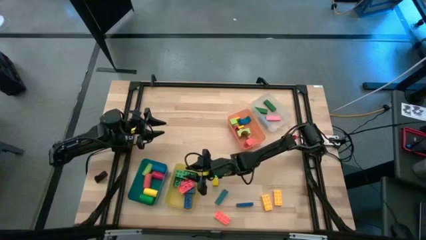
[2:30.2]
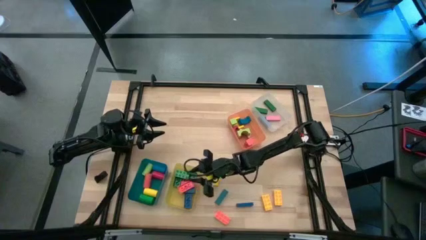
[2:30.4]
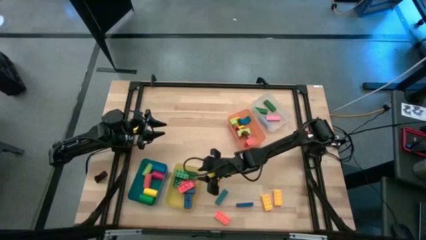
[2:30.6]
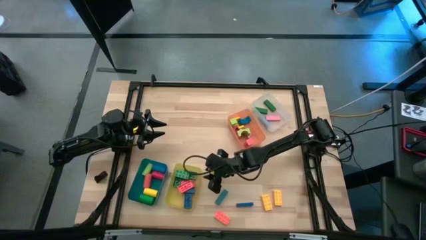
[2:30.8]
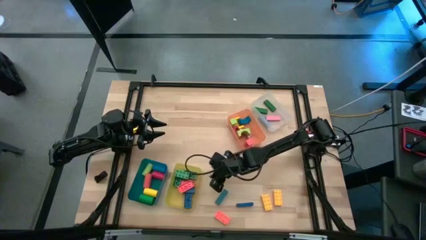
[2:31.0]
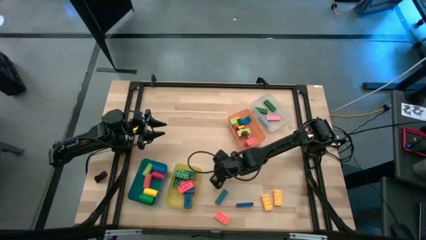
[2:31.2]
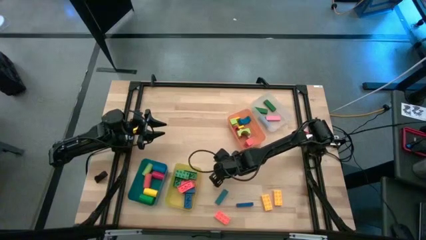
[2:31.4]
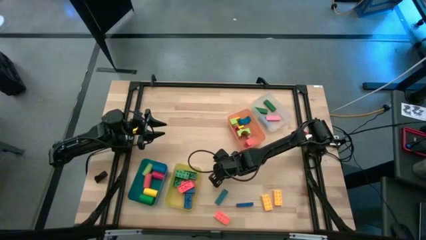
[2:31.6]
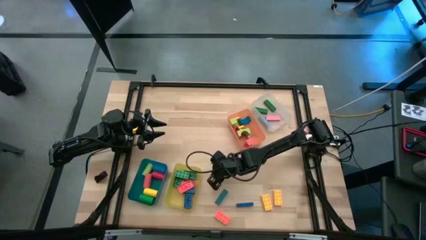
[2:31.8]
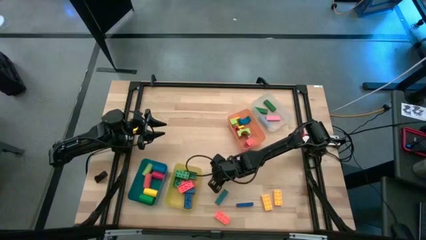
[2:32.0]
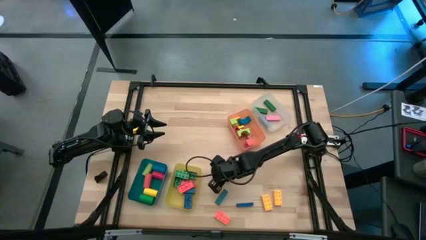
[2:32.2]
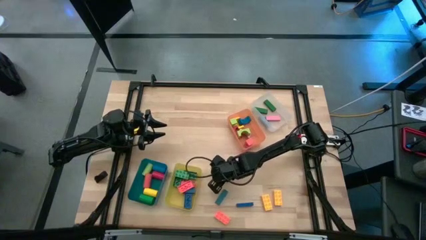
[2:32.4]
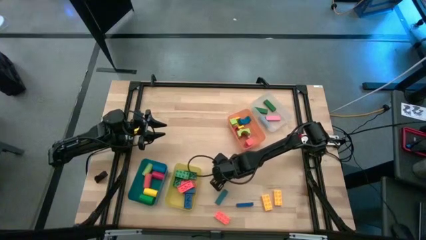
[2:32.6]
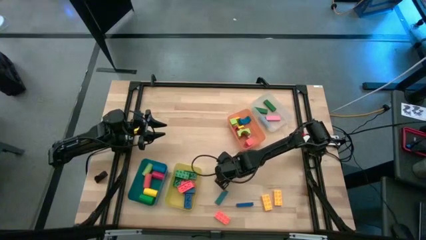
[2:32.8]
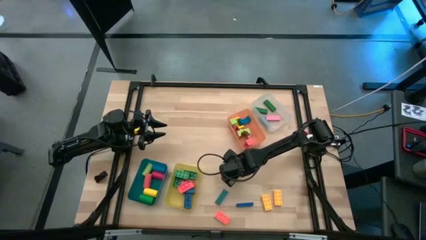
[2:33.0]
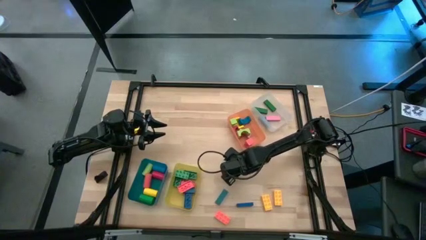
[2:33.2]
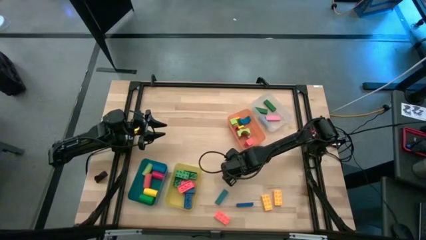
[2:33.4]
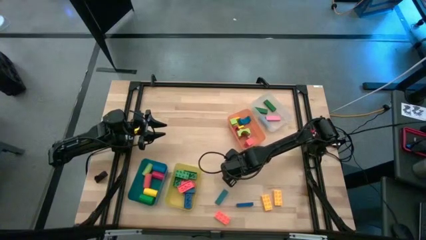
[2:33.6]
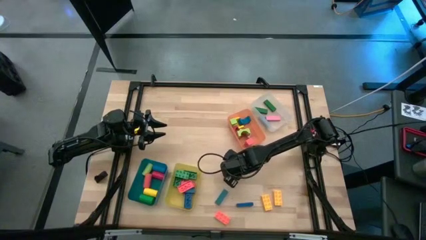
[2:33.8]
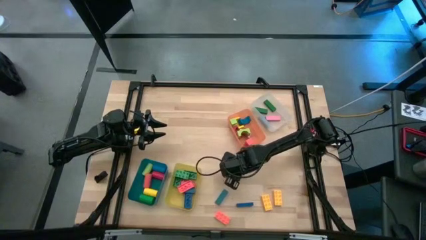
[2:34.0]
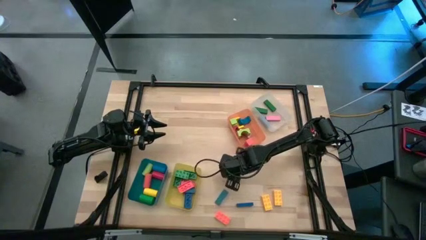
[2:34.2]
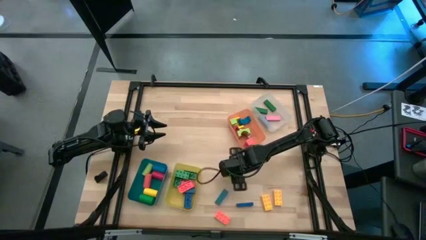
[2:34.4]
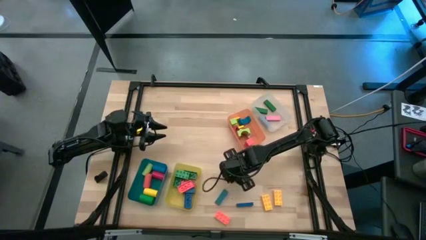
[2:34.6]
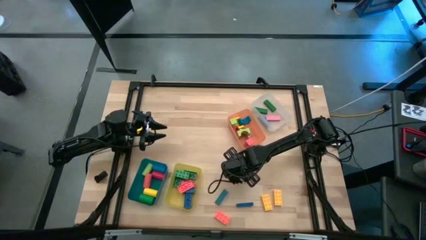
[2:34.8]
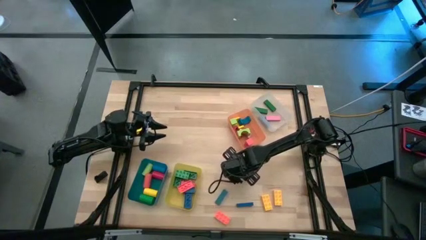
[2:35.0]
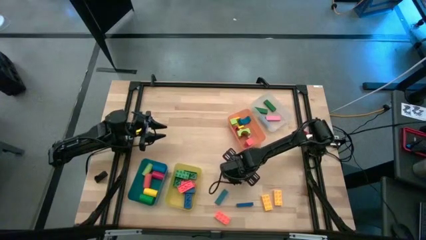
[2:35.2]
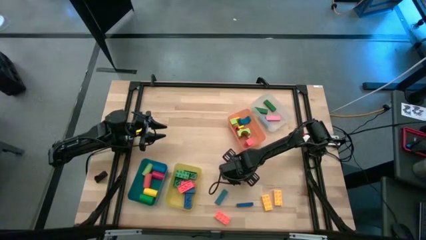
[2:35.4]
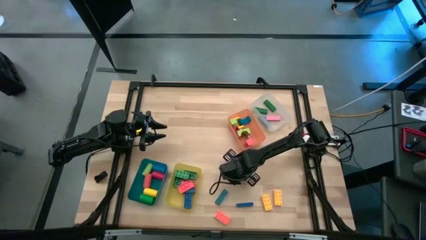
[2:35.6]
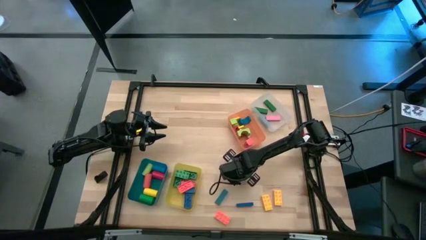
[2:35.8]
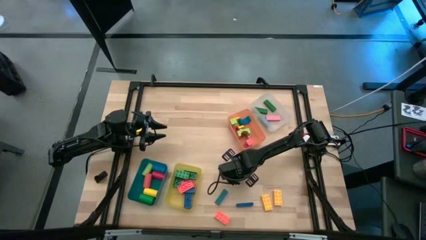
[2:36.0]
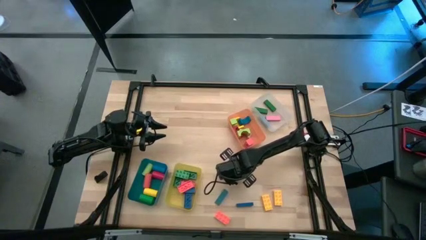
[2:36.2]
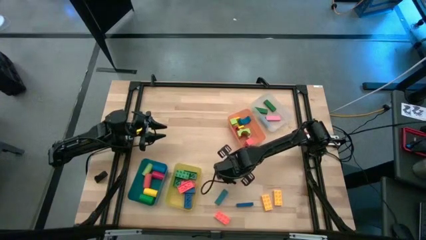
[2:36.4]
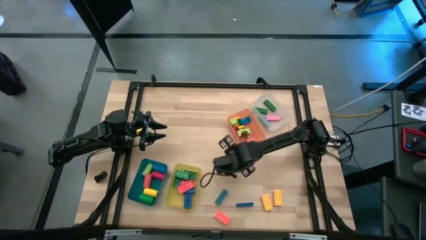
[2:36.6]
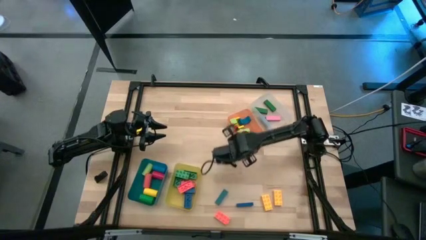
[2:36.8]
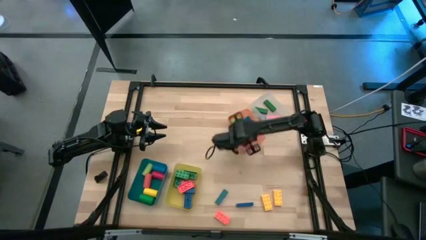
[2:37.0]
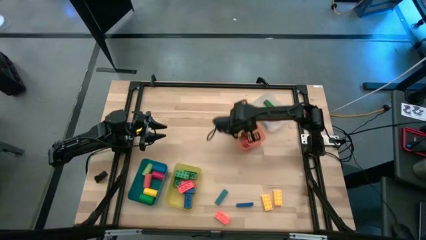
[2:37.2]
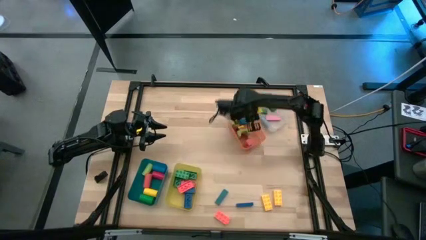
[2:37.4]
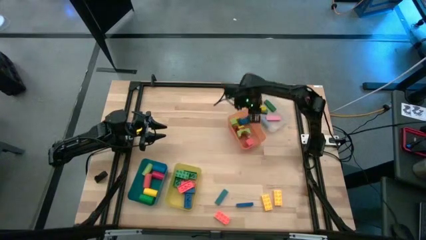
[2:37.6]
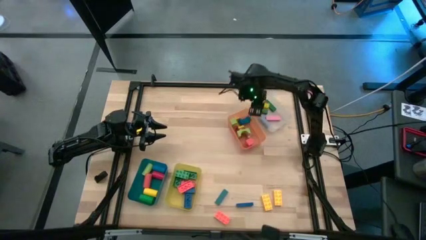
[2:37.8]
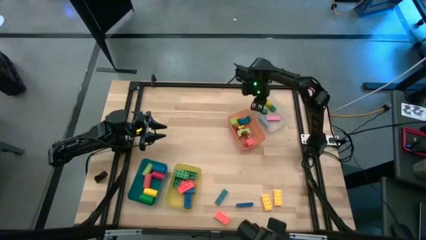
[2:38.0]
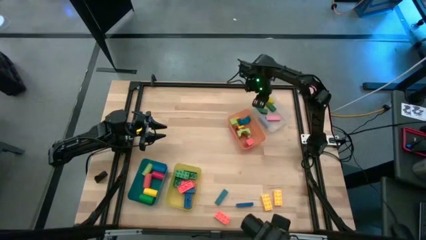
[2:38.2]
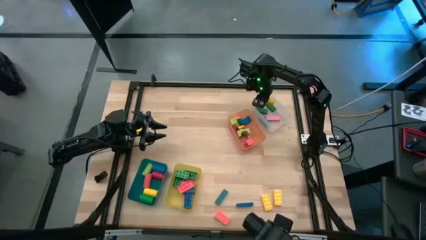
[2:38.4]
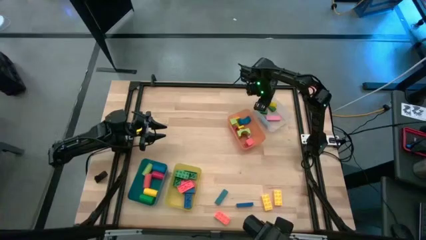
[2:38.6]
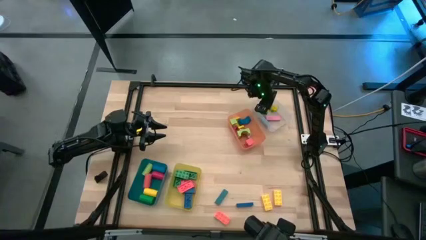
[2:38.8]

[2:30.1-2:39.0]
Task: Sort blocks by size
Put the yellow rectangle block into the transparent bin

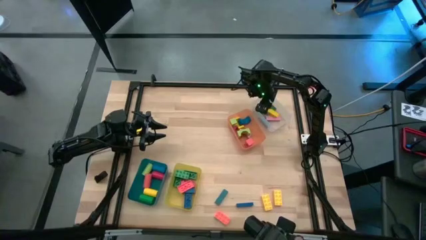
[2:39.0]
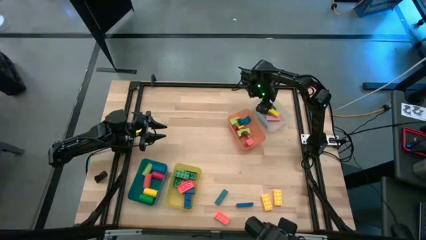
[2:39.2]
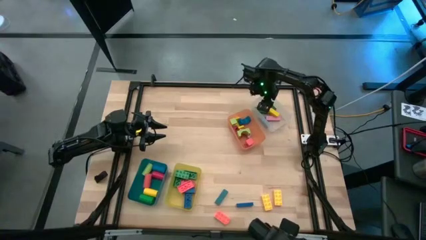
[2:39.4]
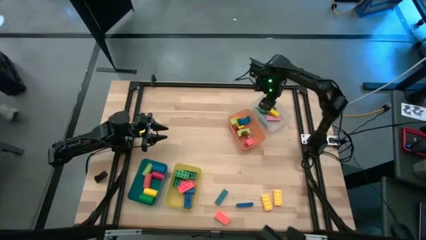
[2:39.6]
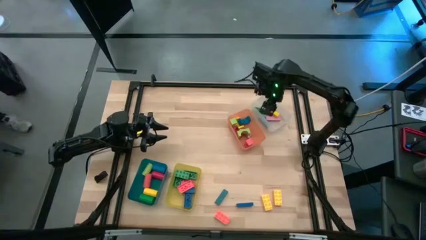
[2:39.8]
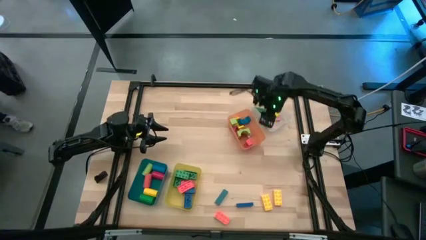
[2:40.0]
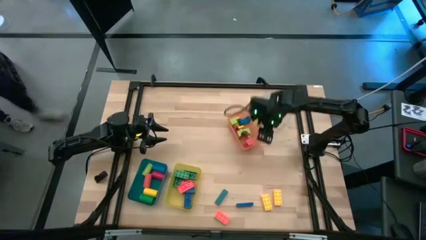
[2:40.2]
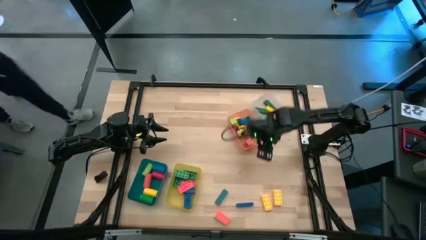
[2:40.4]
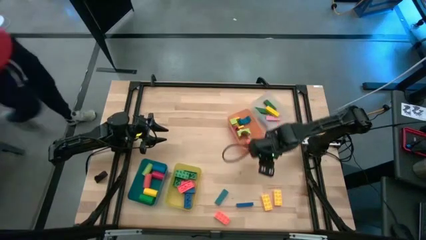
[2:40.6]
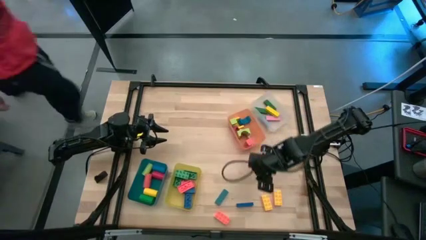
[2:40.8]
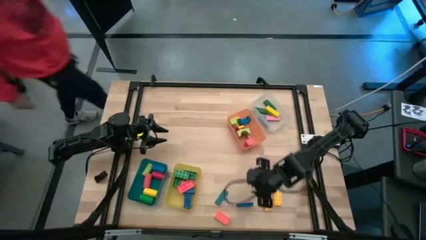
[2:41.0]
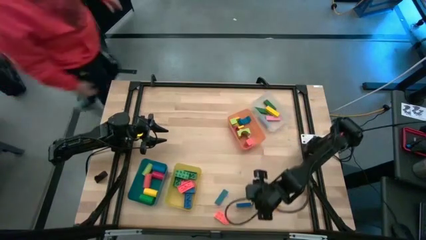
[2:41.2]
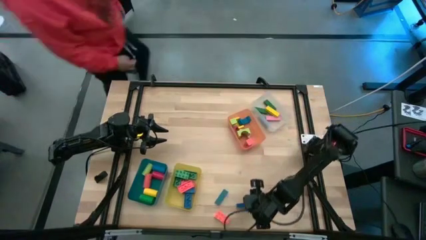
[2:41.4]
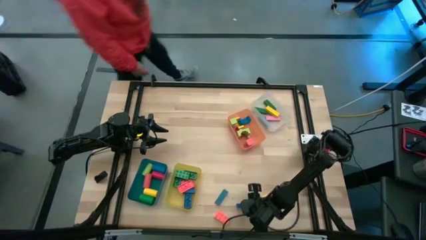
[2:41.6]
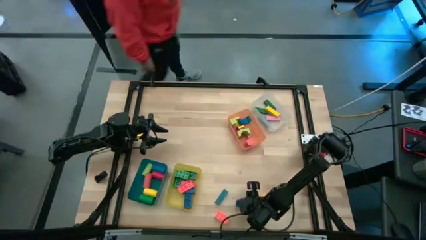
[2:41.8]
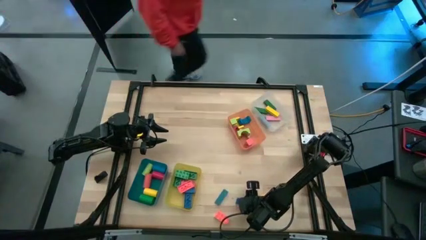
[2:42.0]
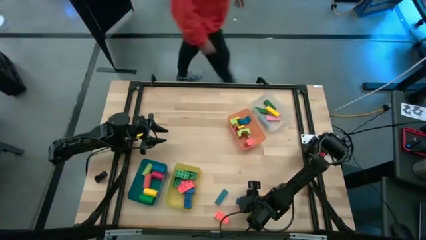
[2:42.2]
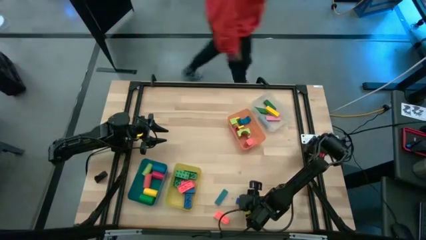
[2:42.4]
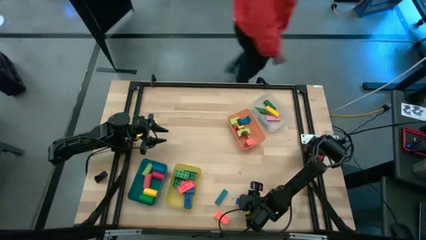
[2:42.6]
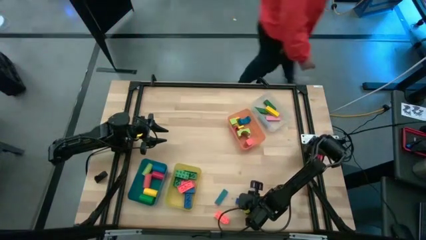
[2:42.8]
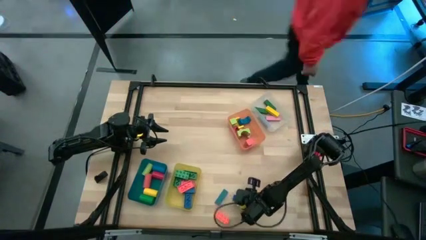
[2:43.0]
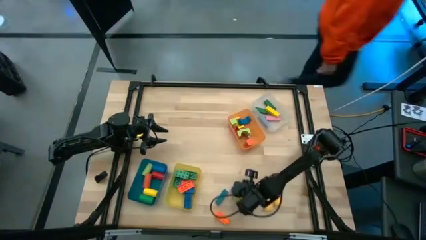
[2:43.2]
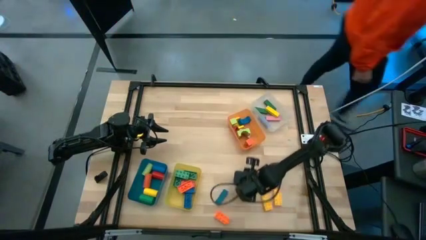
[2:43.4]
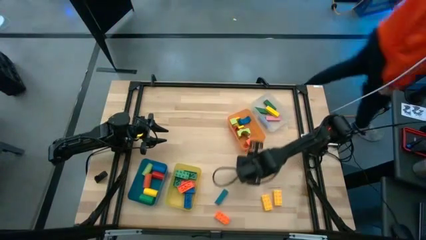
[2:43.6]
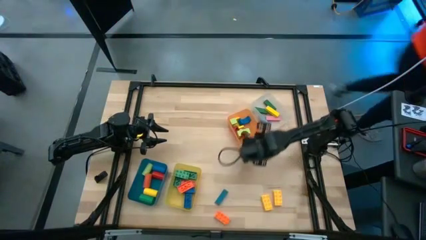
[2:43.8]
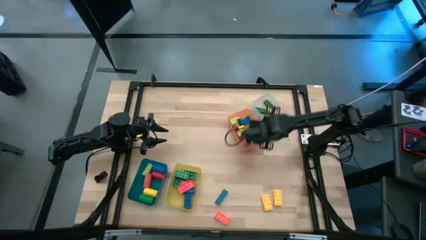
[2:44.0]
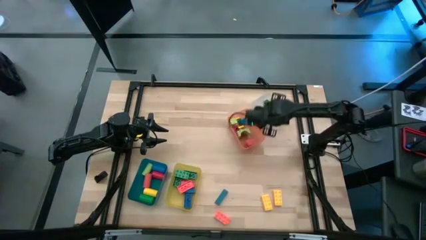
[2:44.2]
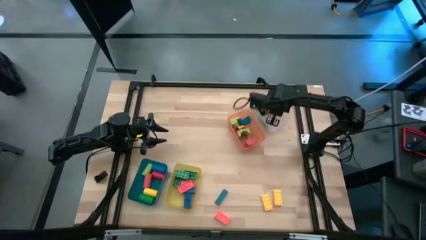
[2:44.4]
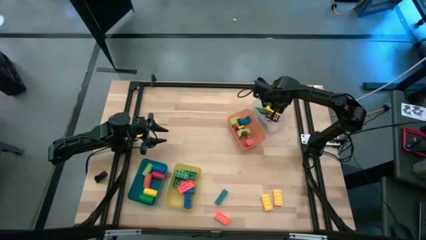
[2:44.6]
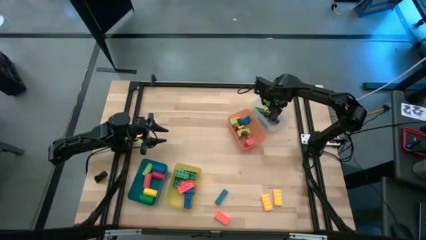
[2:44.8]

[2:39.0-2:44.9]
Put the blue rectangle block into the transparent bin

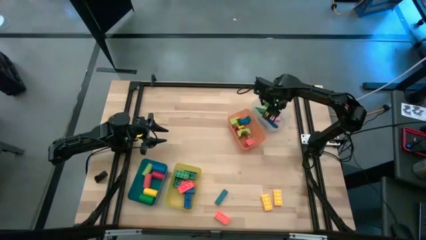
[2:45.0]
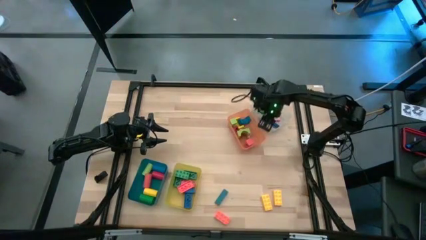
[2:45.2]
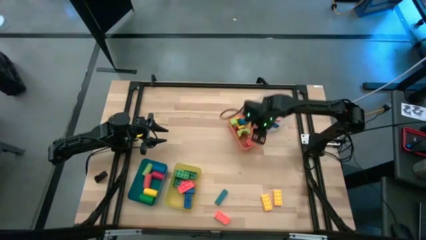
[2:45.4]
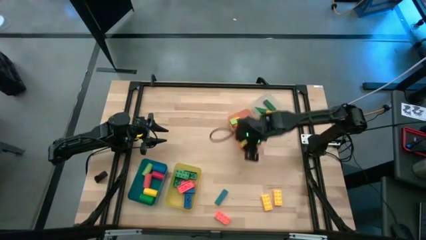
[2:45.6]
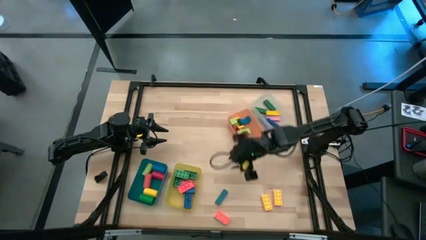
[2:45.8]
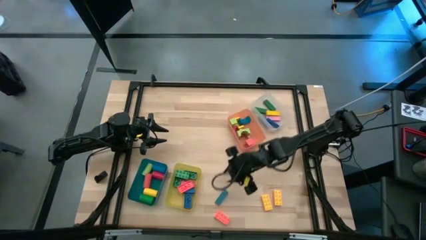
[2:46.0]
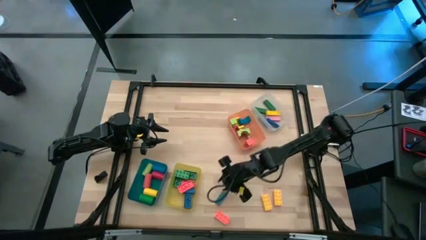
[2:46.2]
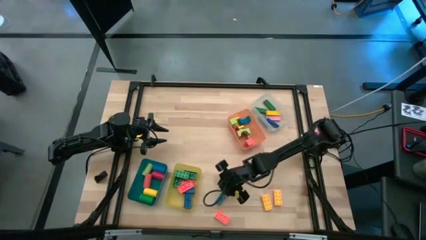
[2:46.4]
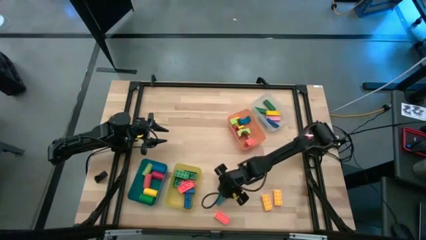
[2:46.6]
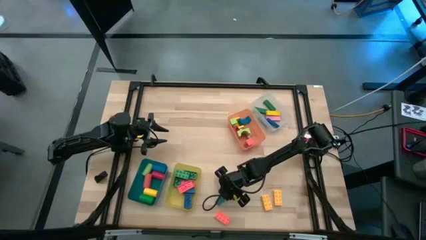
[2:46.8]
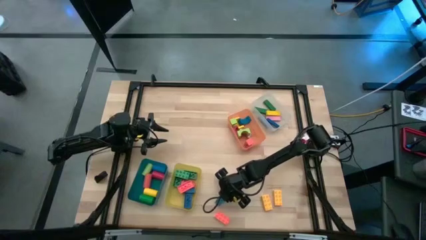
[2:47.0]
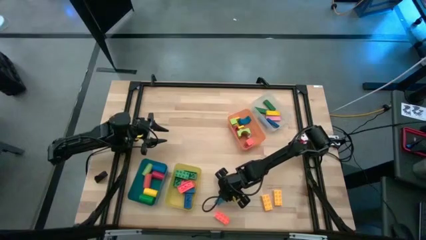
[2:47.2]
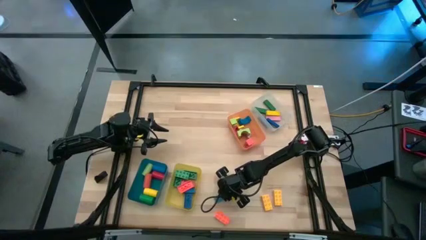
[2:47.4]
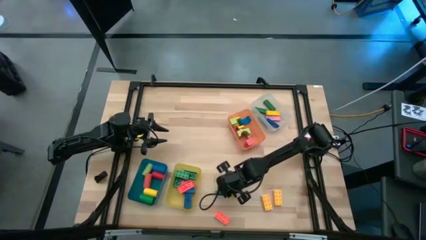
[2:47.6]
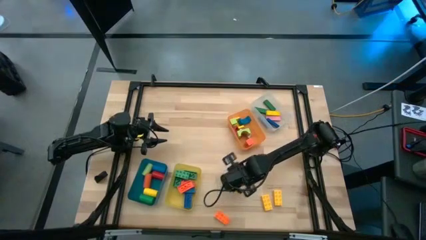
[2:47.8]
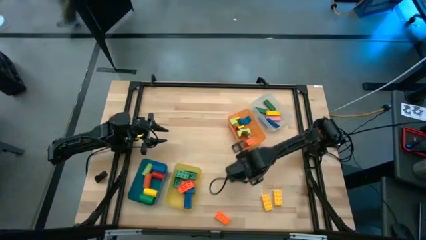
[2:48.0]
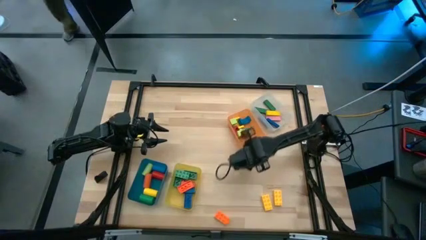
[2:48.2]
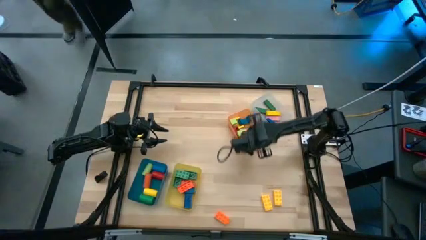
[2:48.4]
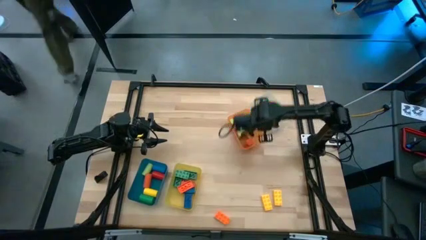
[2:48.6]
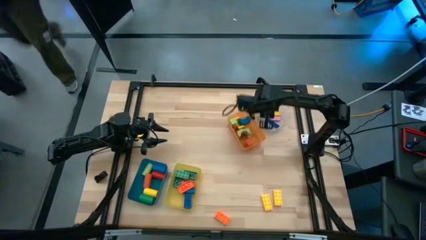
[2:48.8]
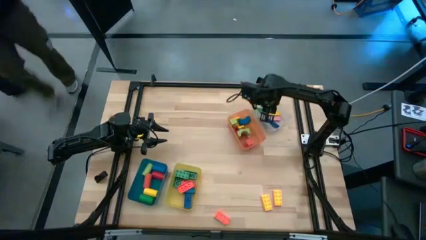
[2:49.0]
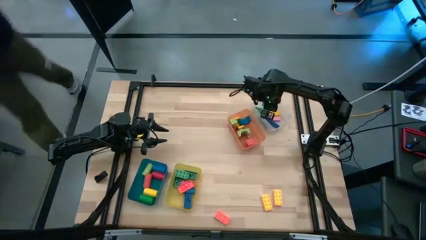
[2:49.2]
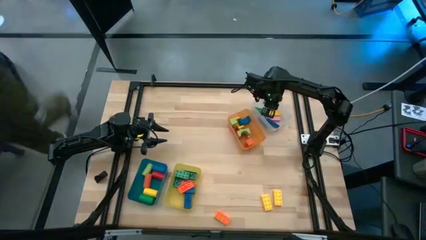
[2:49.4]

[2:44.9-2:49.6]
Put the blue rectangle block into the white bin
